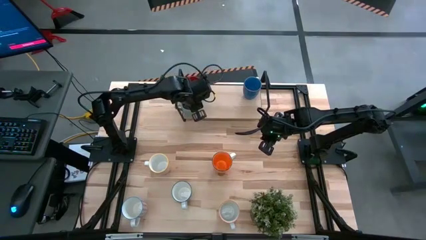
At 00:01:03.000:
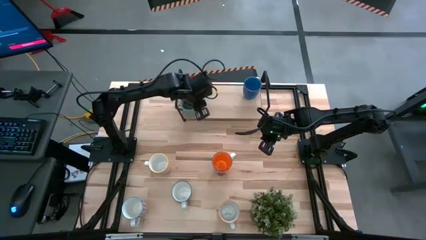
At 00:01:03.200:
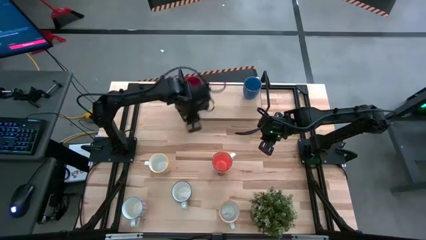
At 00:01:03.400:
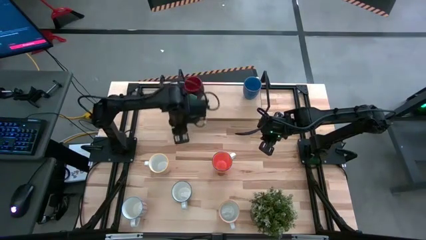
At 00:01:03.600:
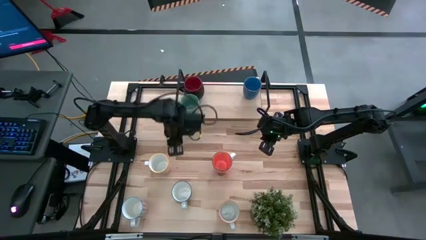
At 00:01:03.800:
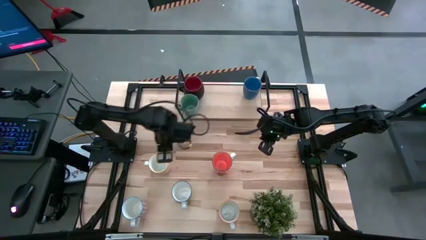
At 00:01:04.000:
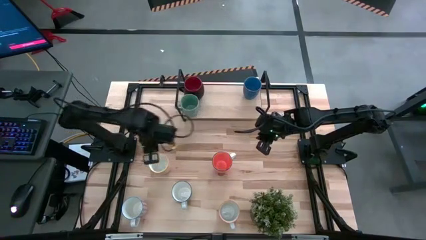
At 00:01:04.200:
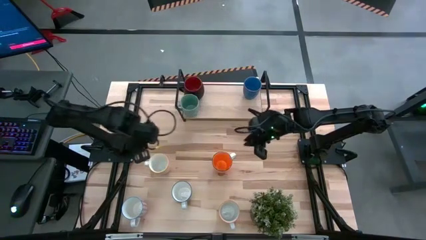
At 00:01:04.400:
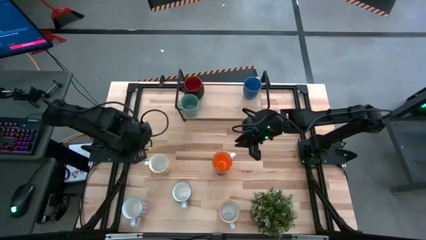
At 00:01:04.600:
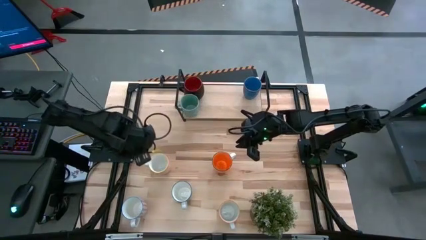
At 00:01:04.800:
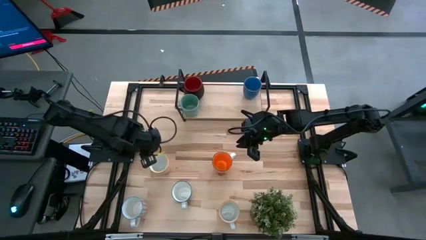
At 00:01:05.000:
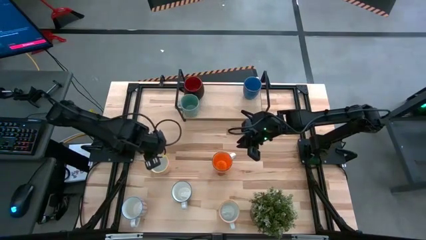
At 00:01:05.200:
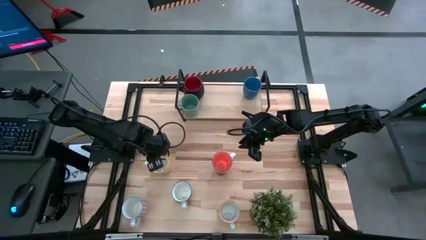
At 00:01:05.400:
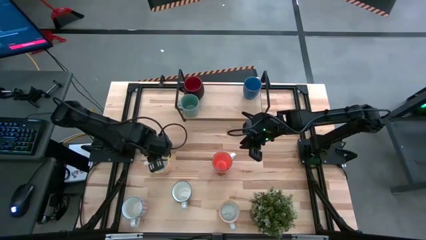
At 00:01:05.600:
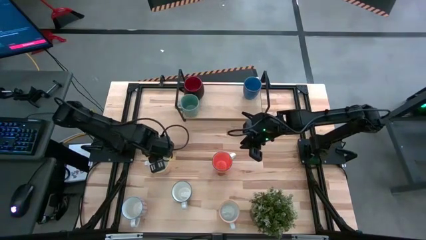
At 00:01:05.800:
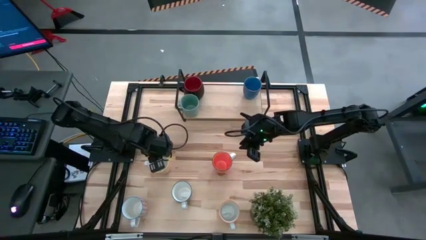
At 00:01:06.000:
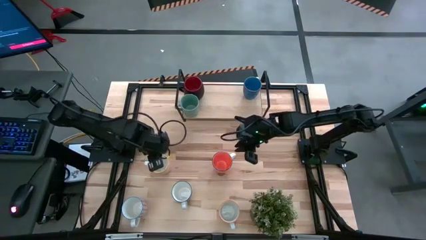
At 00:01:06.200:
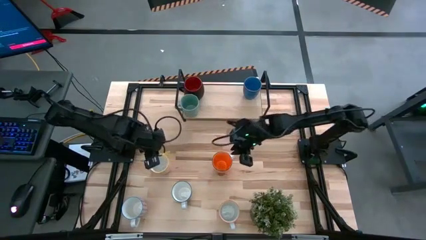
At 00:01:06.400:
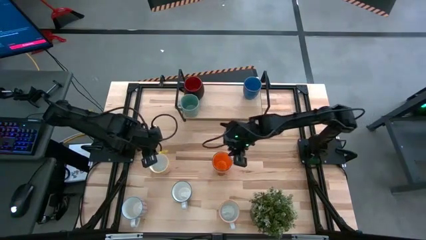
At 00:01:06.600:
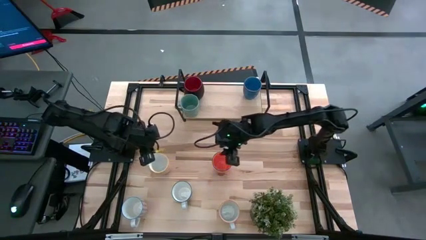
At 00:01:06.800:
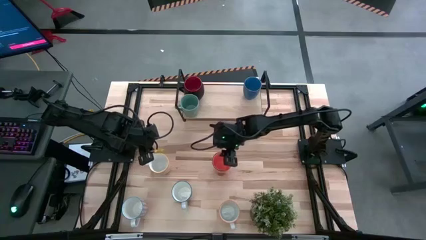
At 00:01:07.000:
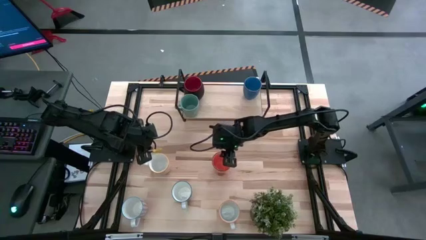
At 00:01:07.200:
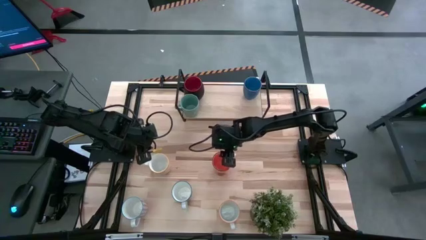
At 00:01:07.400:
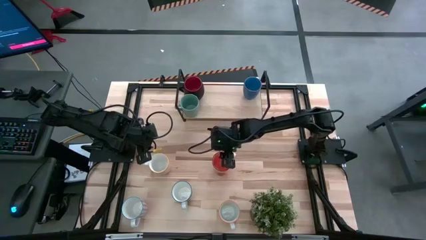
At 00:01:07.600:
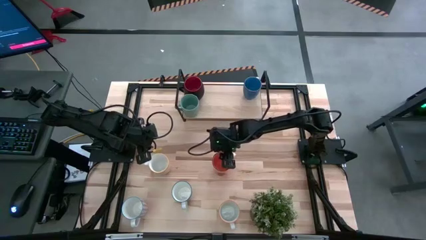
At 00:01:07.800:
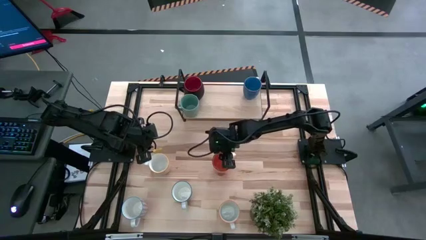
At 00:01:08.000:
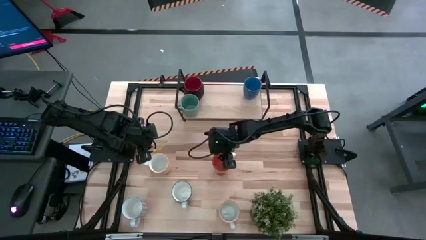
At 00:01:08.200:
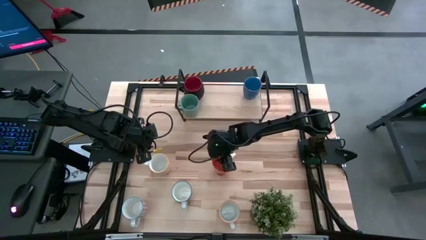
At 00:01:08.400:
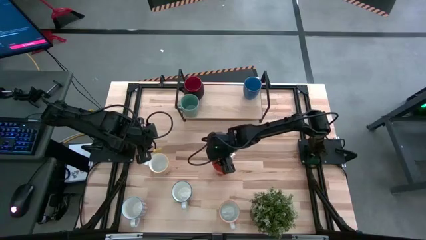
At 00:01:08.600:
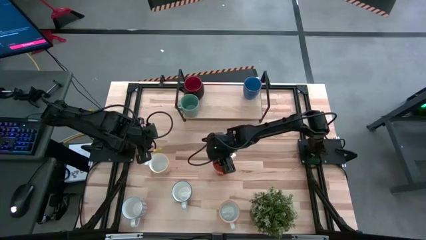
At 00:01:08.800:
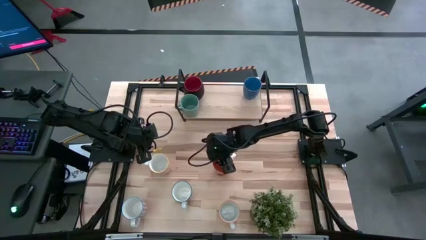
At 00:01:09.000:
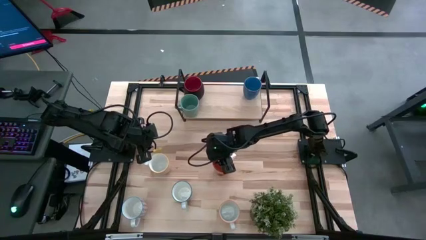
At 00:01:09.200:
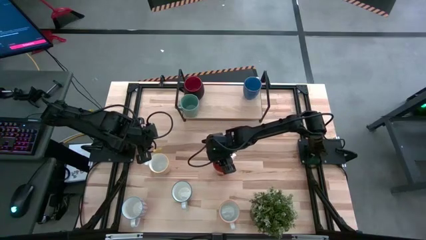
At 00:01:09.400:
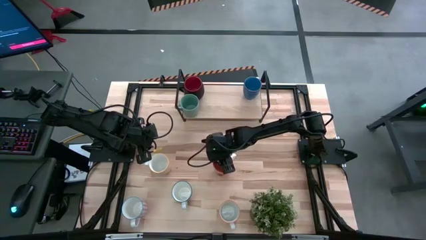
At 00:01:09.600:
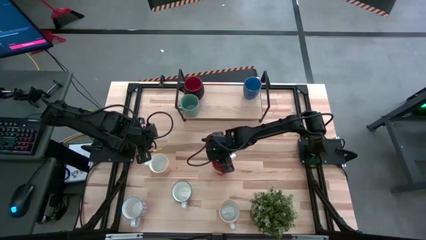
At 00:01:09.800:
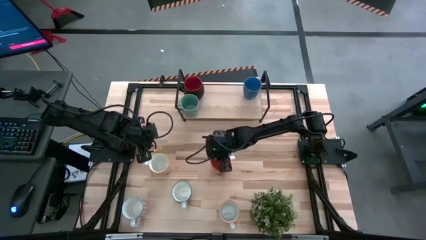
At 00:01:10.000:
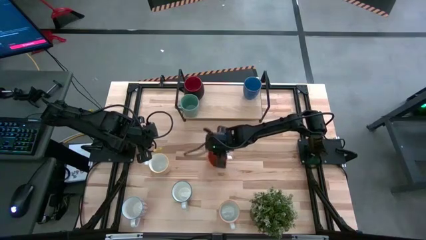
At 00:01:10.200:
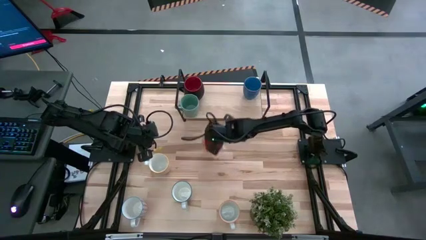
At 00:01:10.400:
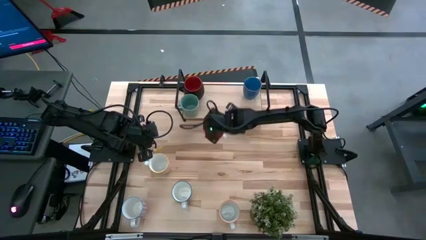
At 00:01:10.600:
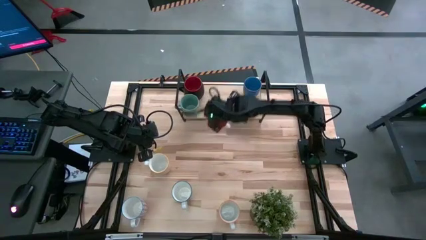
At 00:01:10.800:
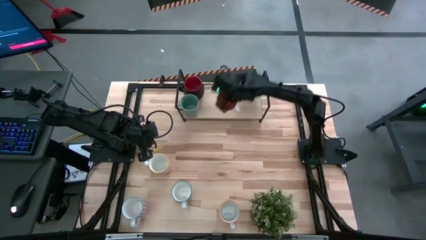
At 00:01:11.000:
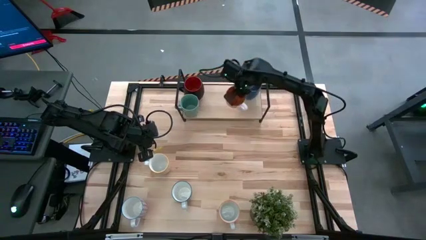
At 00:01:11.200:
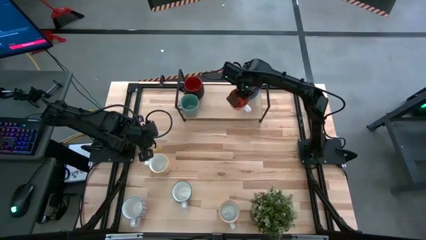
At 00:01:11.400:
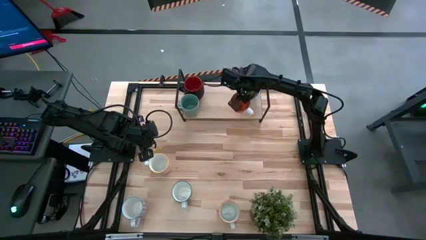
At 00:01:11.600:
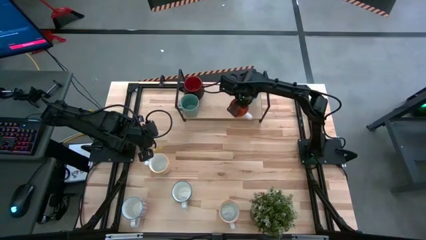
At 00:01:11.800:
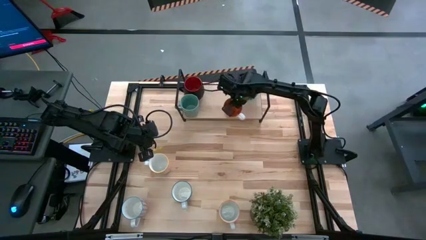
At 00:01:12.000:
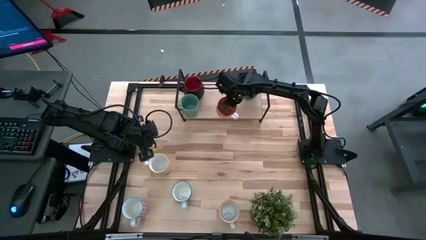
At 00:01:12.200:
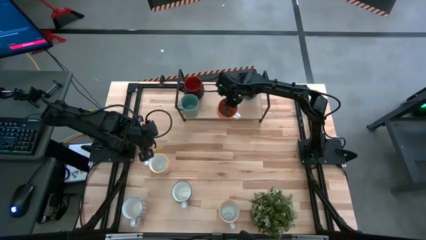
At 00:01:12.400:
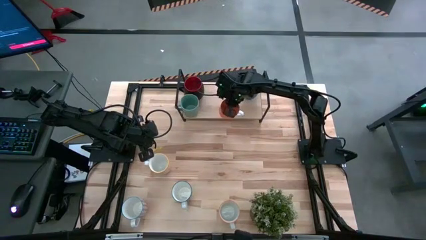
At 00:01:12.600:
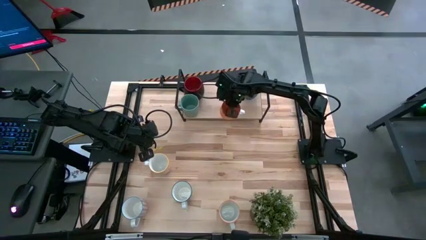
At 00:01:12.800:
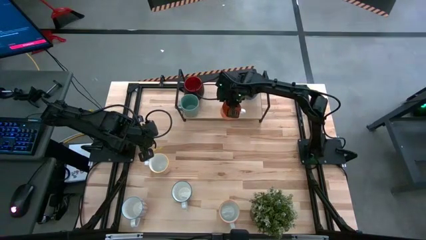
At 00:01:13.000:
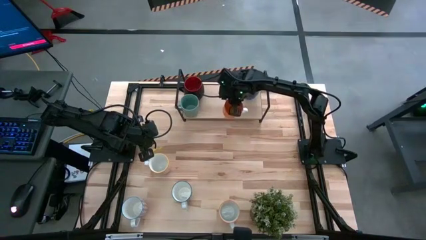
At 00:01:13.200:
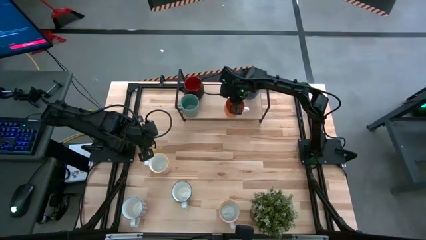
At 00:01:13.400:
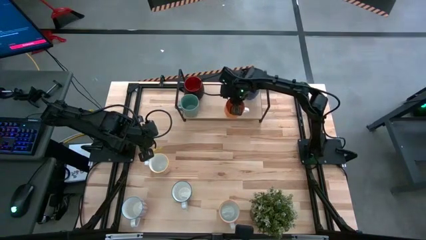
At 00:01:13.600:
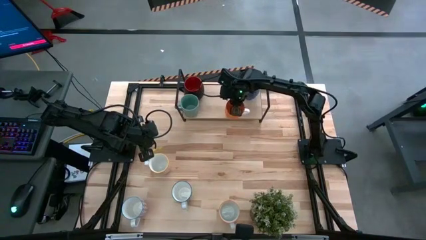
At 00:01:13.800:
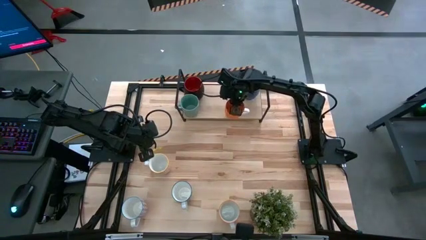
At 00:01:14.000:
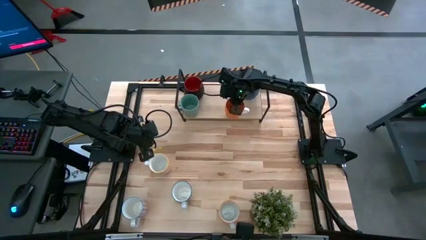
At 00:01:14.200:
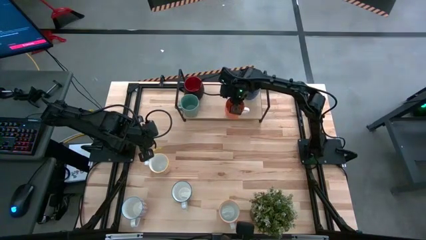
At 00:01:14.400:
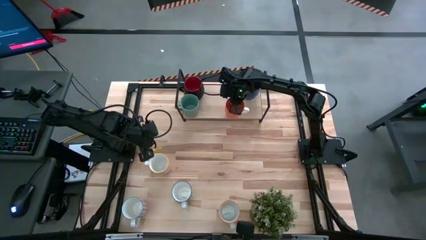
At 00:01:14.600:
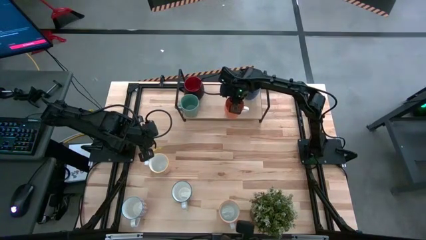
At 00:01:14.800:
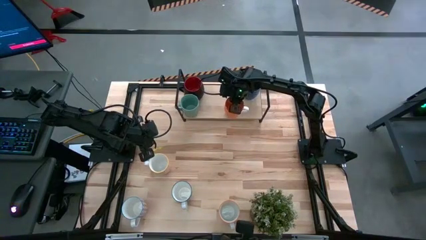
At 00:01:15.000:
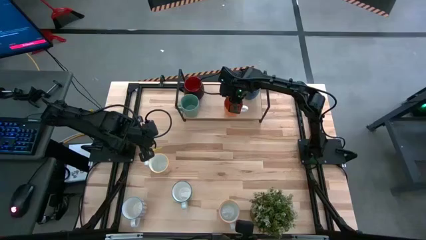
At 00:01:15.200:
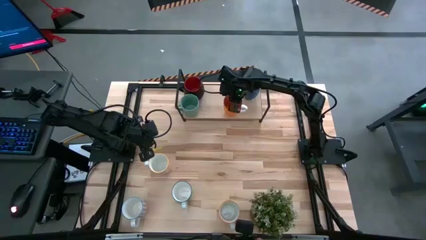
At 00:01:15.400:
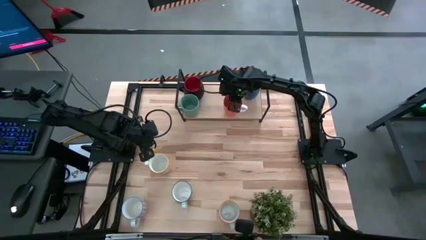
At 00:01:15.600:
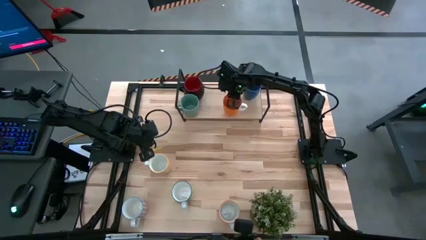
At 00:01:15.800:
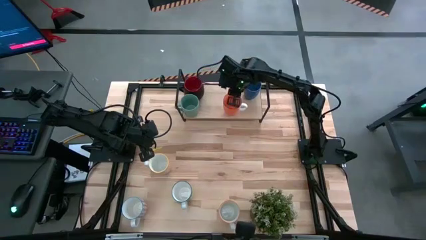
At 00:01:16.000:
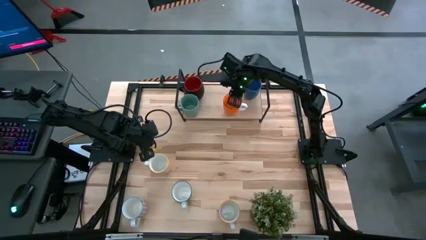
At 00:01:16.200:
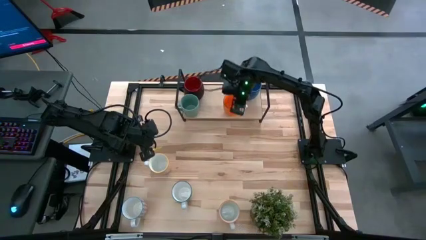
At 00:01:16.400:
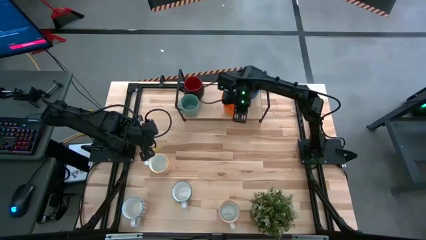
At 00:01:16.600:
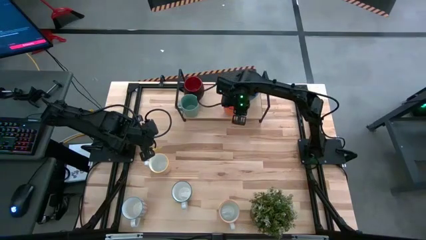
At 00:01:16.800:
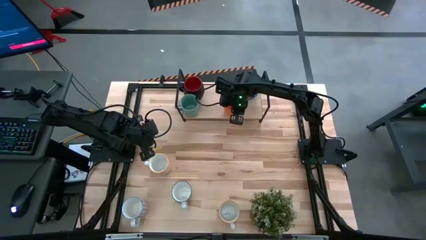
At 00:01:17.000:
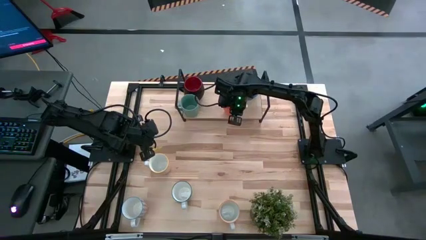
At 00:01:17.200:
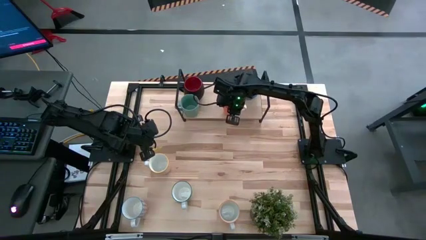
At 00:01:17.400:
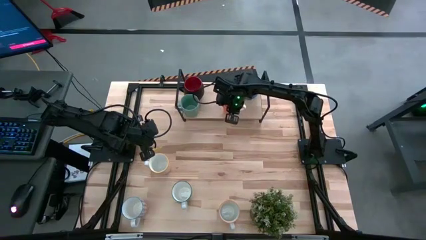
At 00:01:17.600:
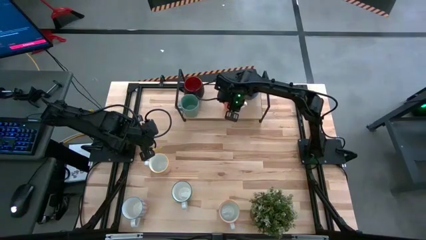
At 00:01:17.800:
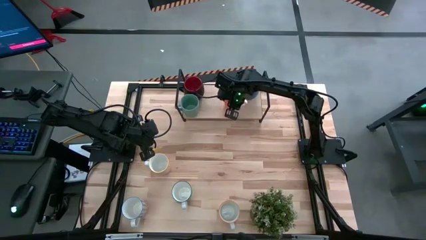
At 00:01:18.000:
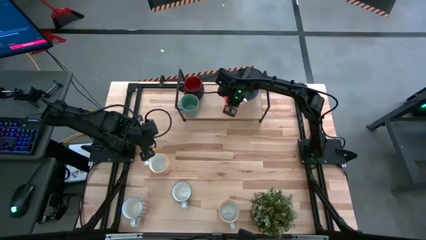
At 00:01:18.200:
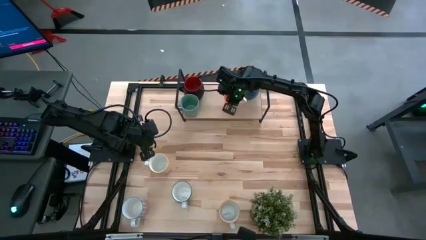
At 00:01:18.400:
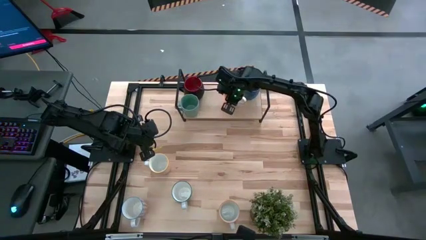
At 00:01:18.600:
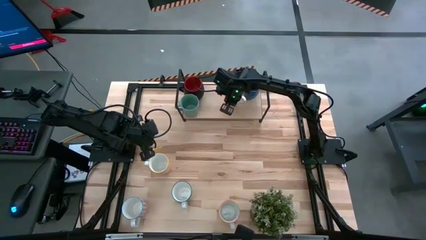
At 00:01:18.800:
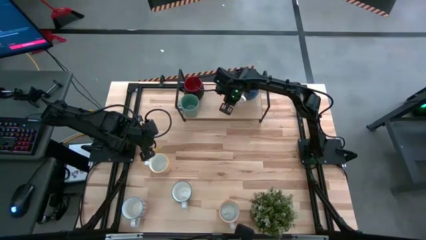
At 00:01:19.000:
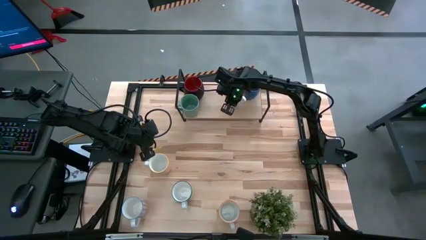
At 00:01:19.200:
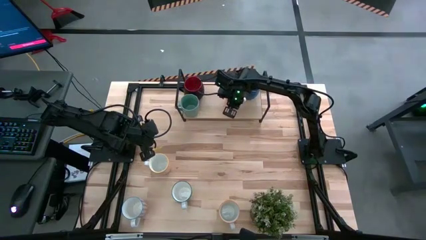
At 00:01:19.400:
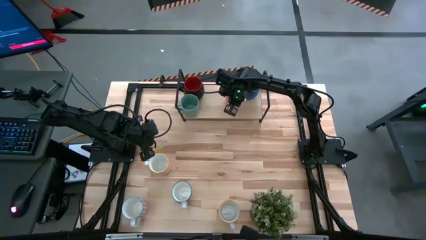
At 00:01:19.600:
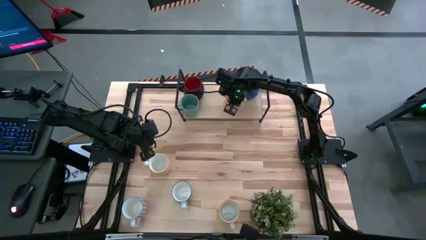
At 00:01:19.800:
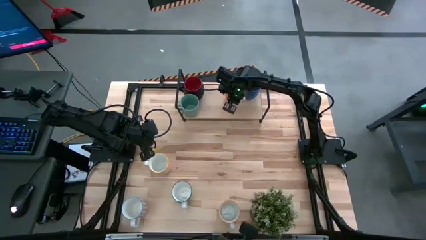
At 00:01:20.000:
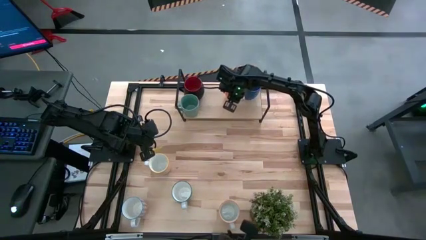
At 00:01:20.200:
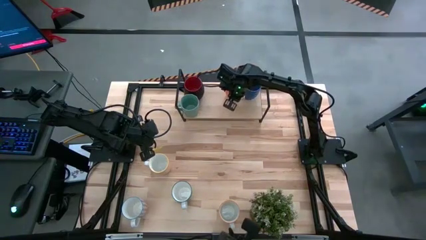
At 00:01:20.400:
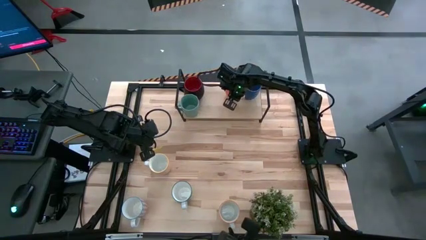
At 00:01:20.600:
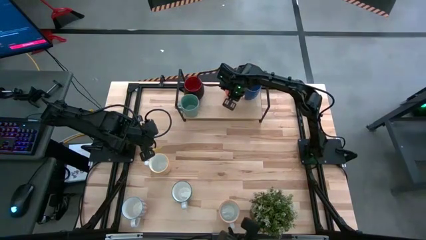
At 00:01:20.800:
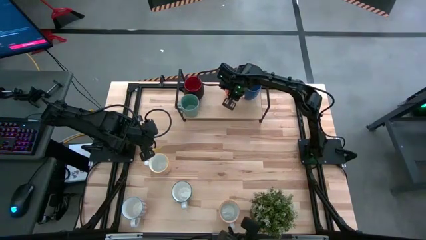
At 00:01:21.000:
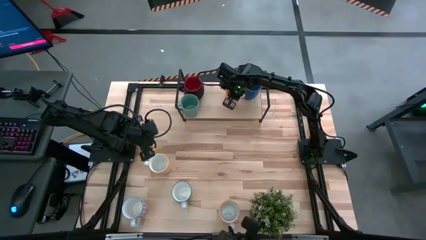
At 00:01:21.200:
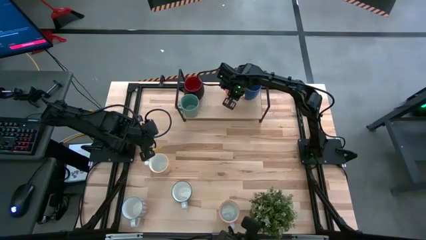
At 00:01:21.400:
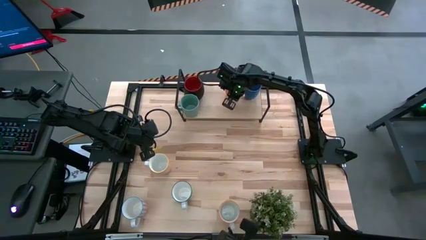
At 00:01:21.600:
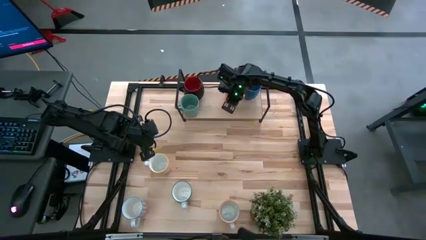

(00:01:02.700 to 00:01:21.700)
Task: Place coffee mugs
Put the orange mug on the shelf
